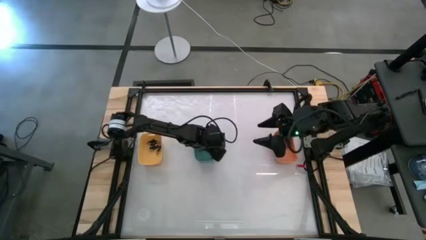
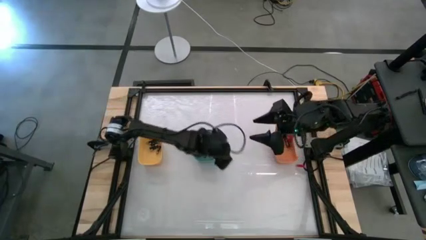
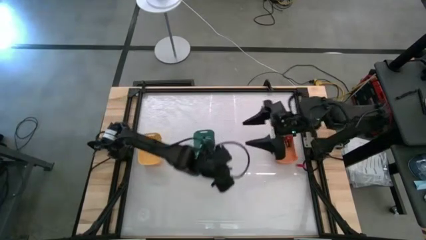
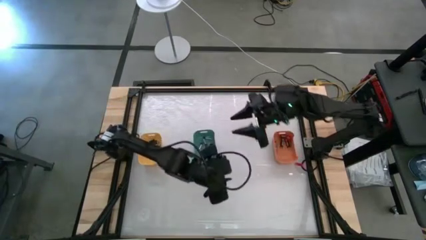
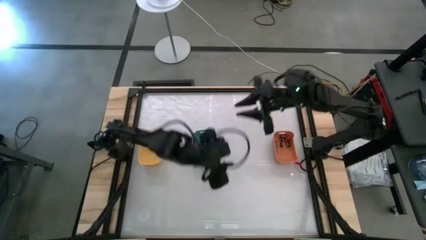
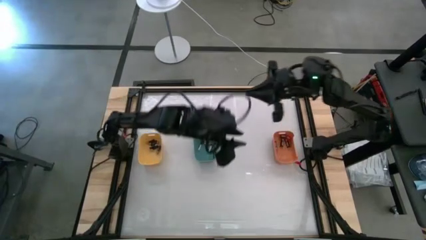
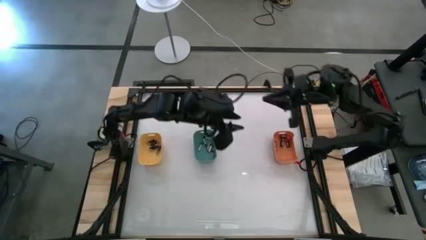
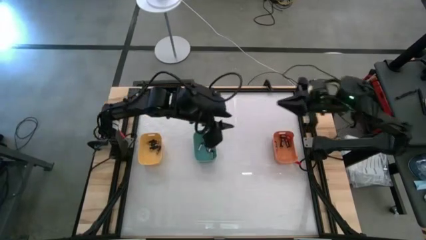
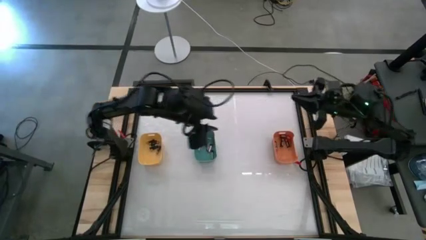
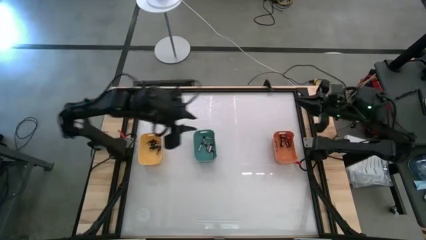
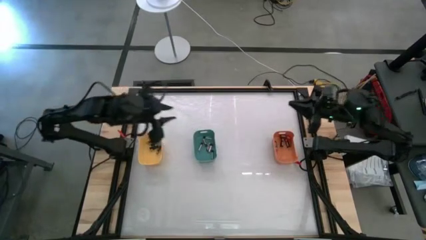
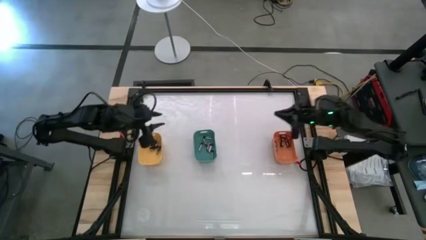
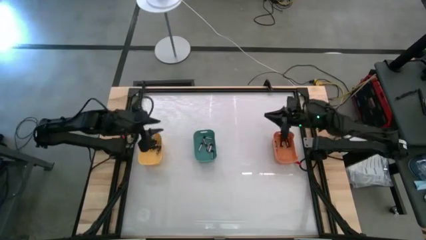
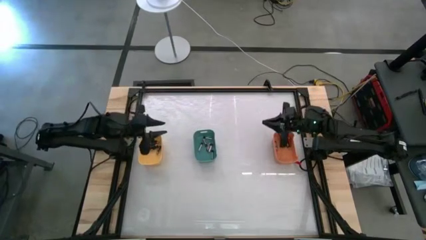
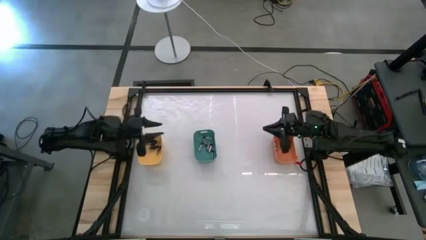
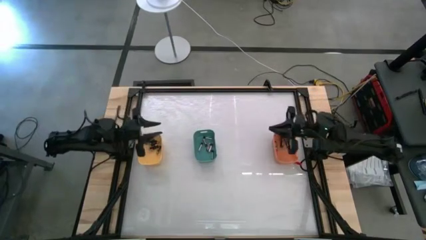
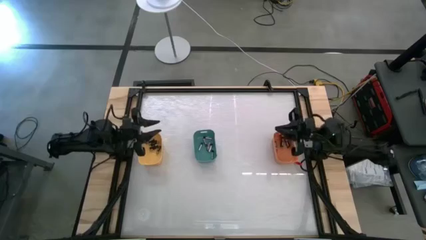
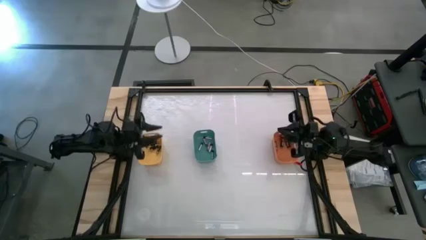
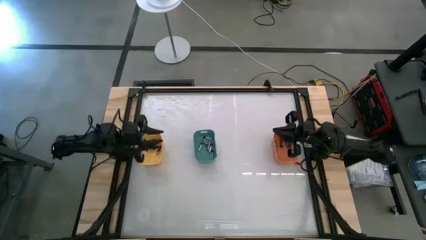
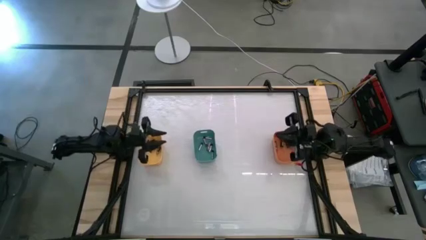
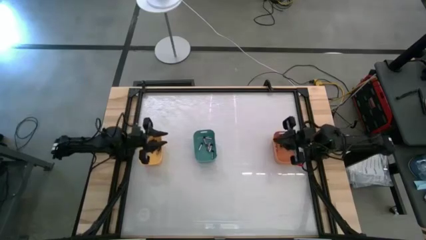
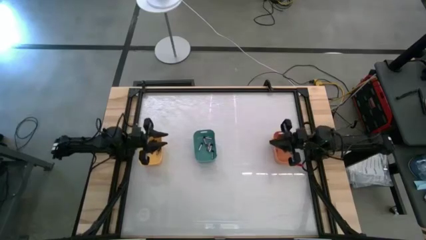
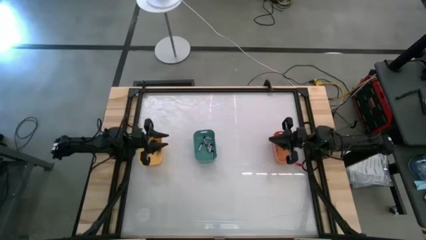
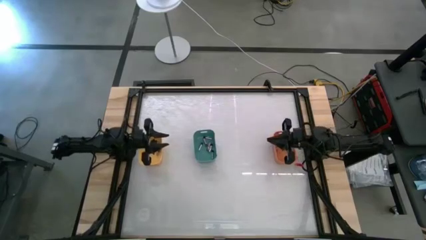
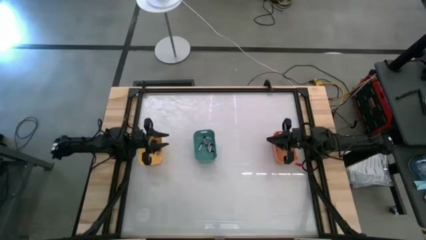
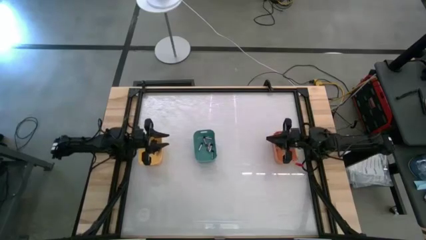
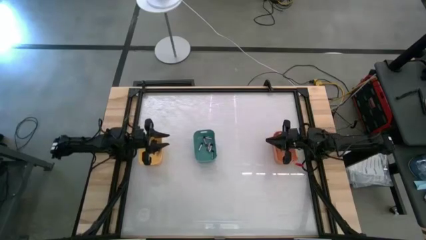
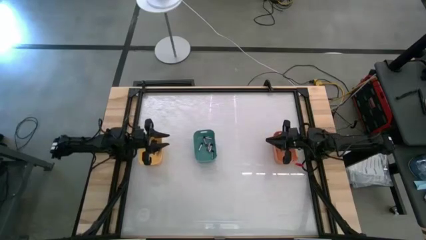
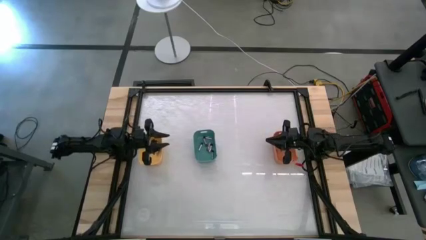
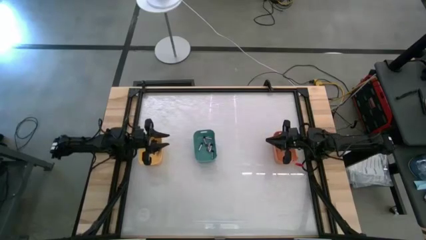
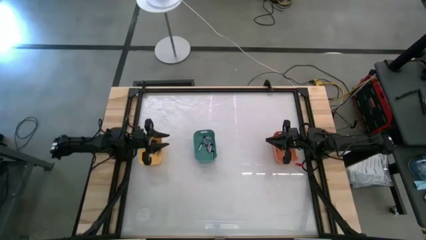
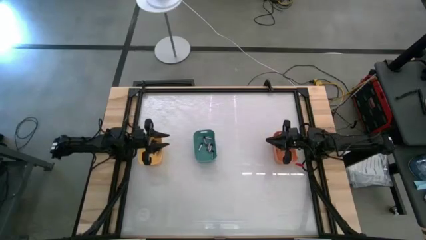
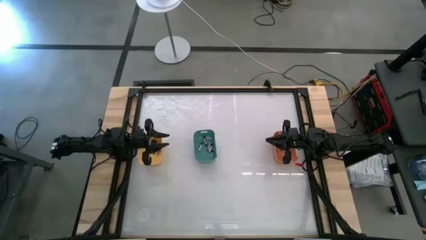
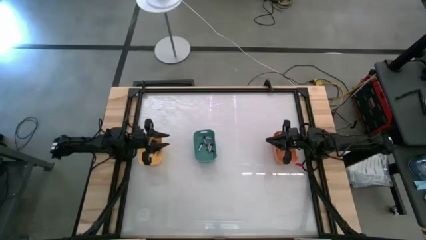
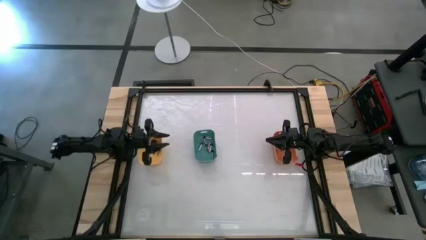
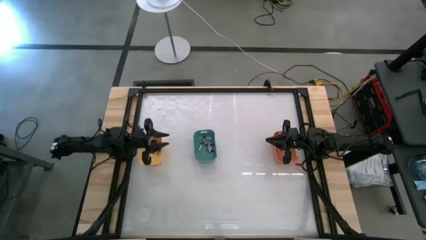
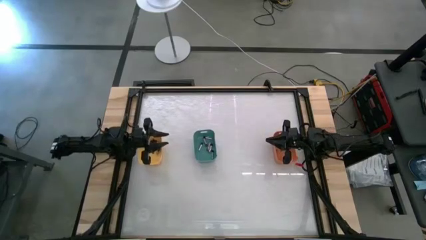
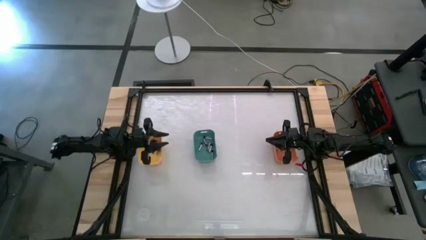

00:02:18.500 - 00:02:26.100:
Task: Sort batteries
Return to Home Position

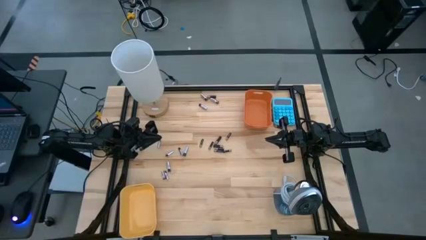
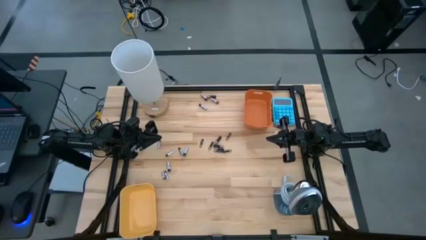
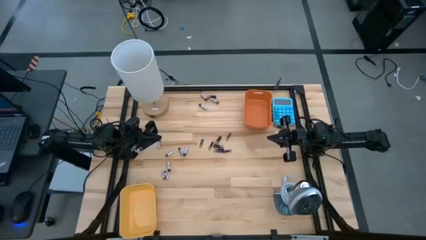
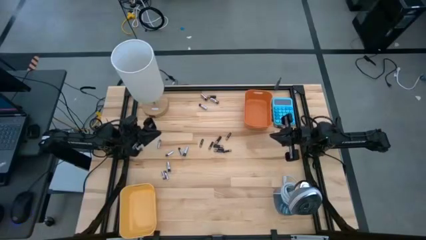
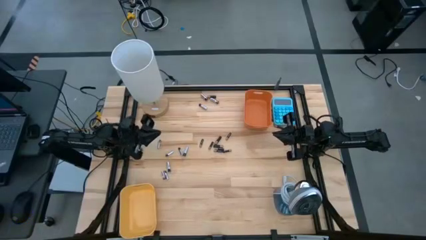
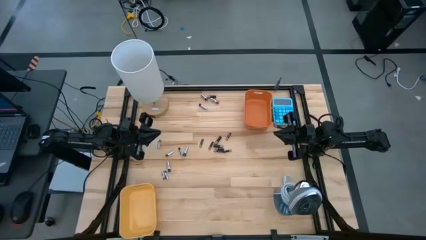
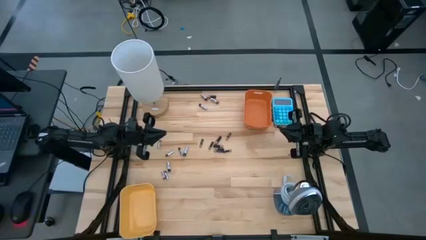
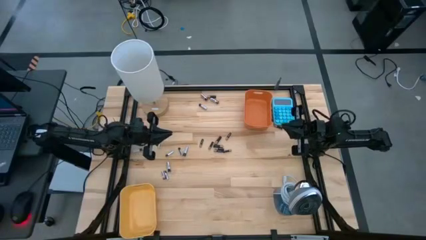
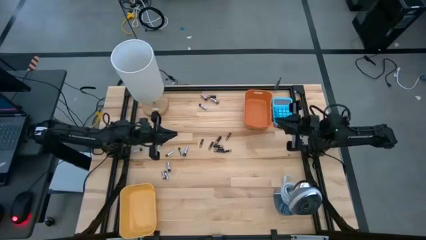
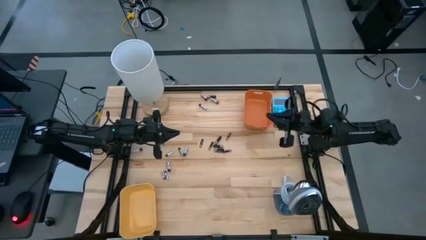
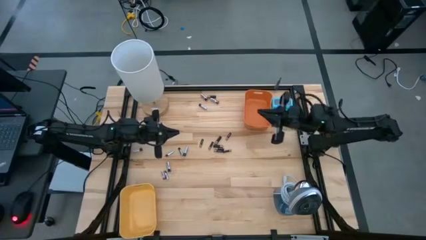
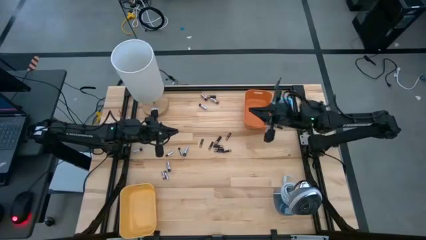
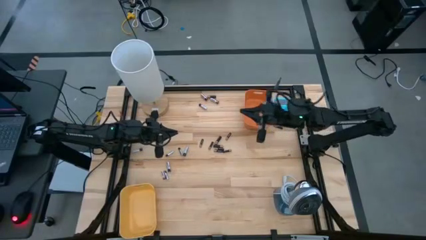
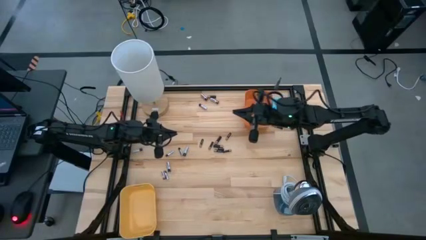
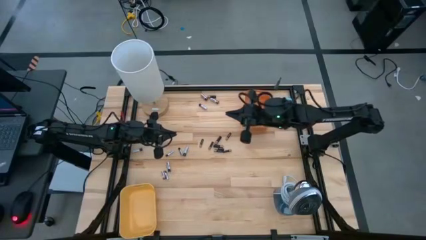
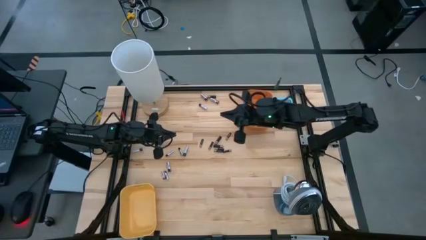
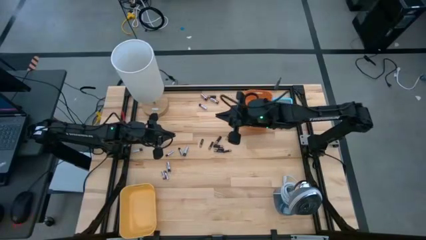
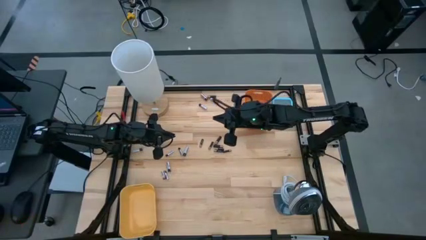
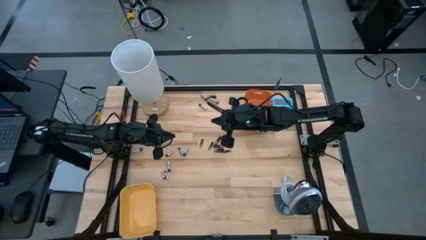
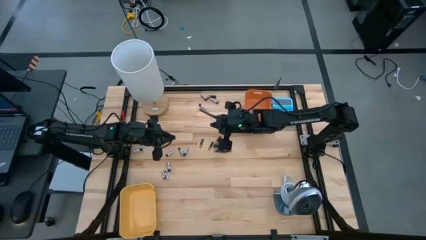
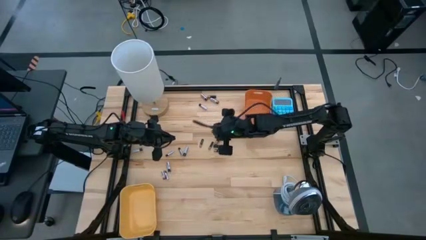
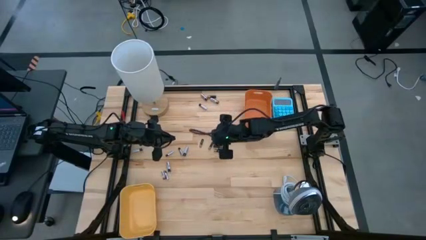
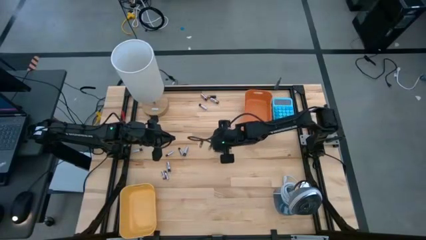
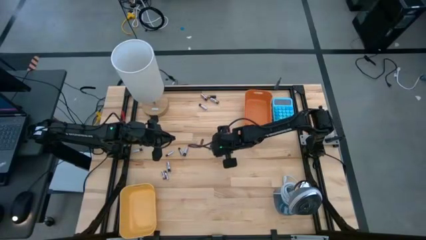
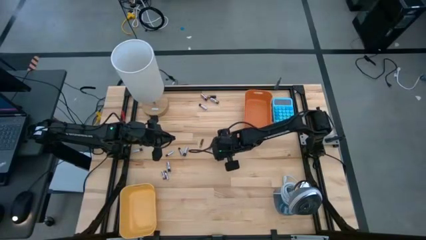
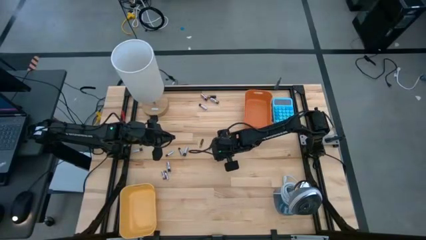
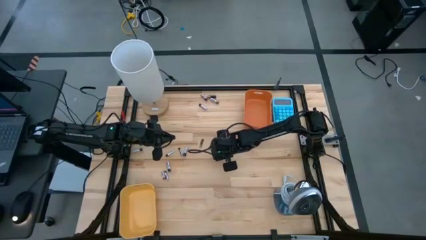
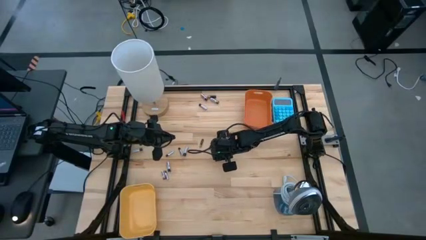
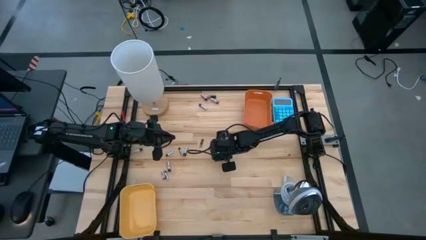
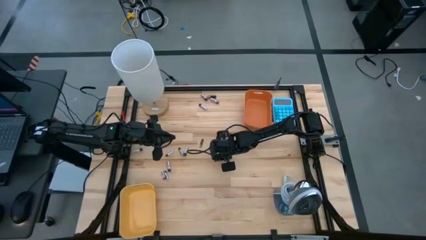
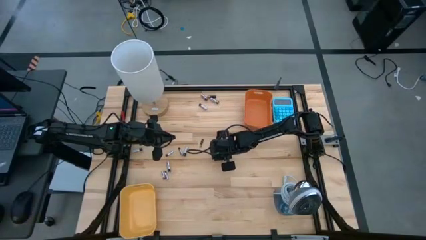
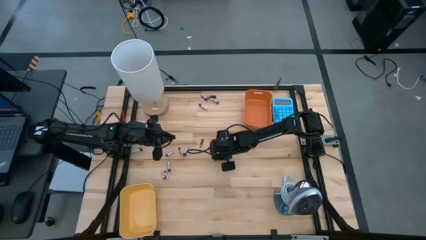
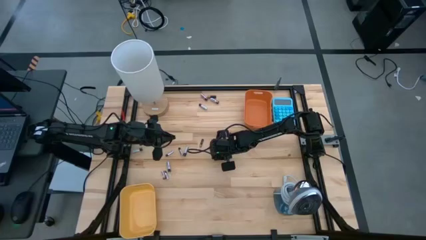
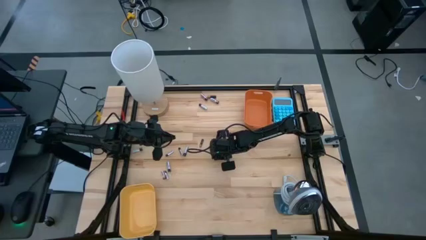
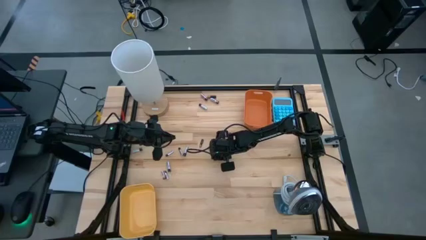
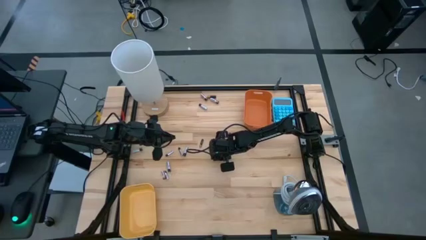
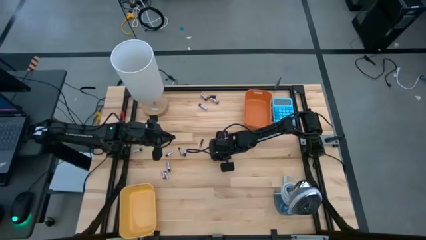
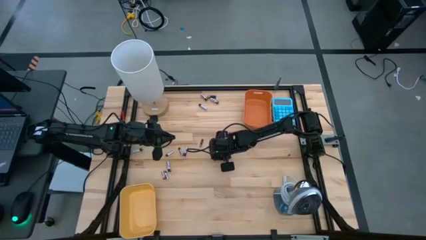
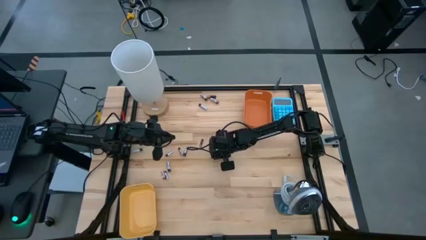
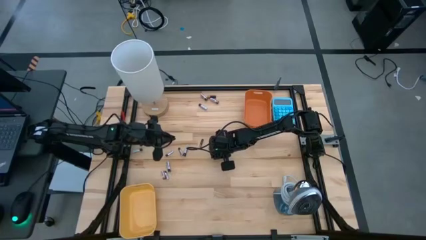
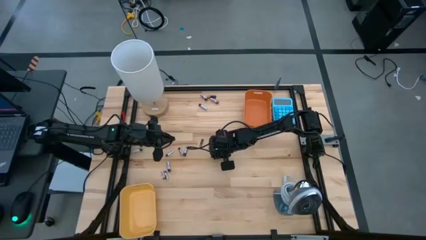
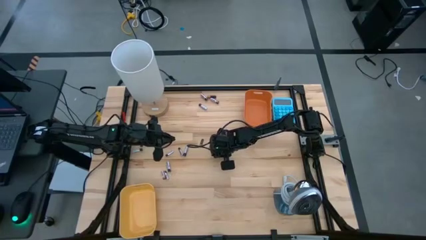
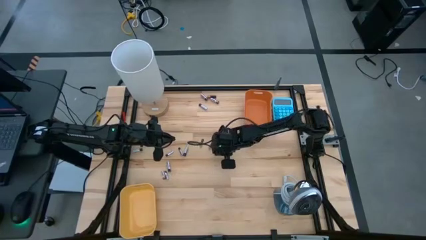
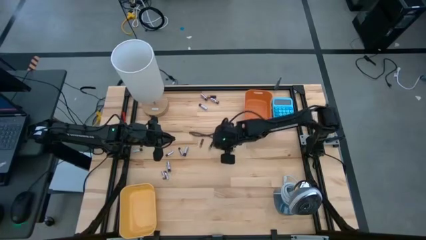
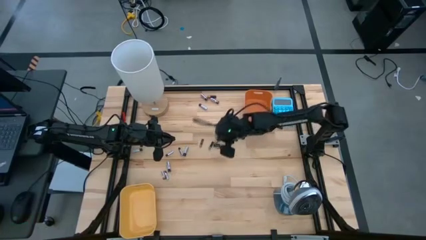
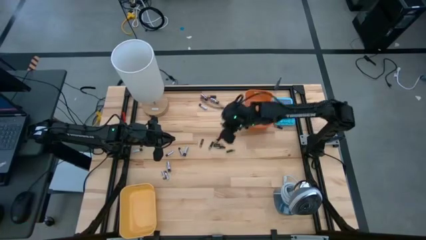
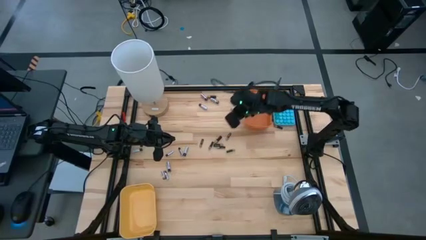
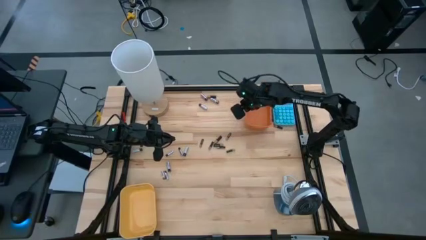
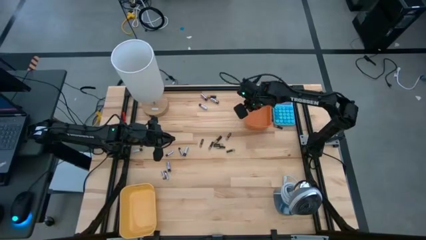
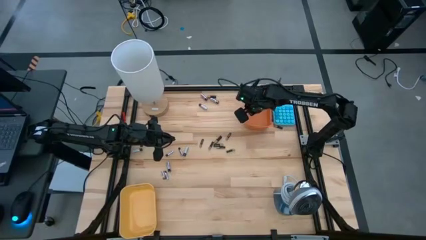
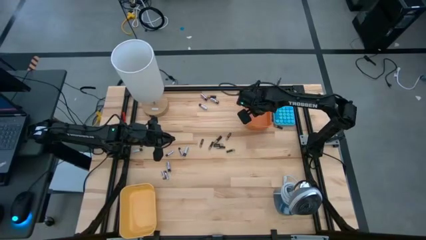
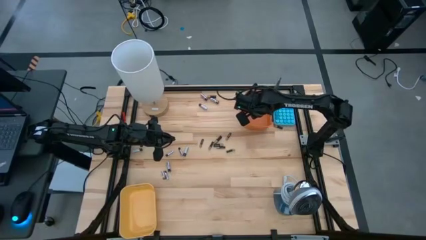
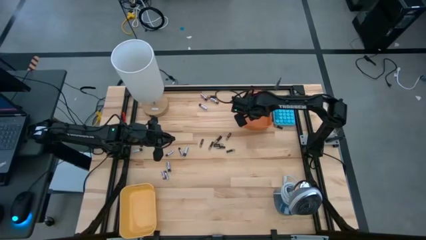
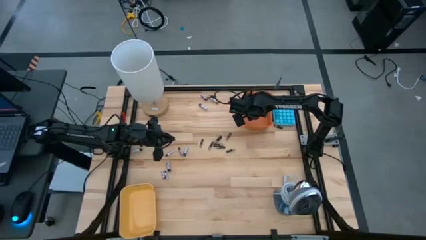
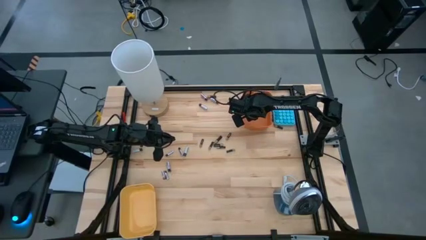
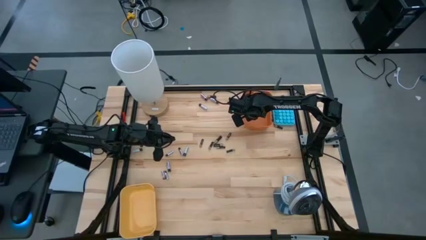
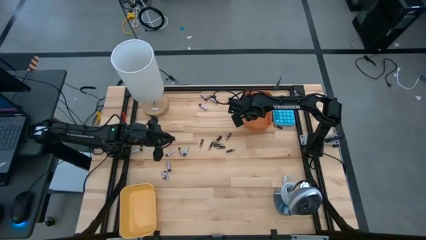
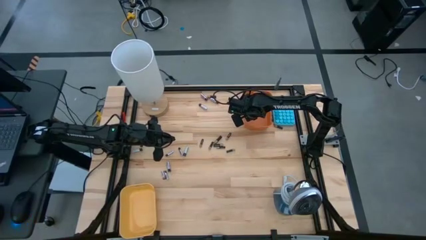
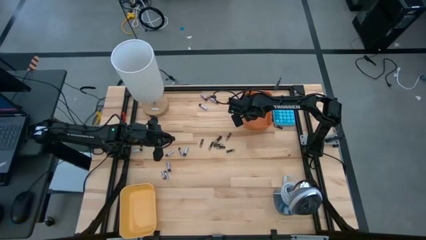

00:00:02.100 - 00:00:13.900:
Task: Sort batteries
Put the black battery into the orange bin
